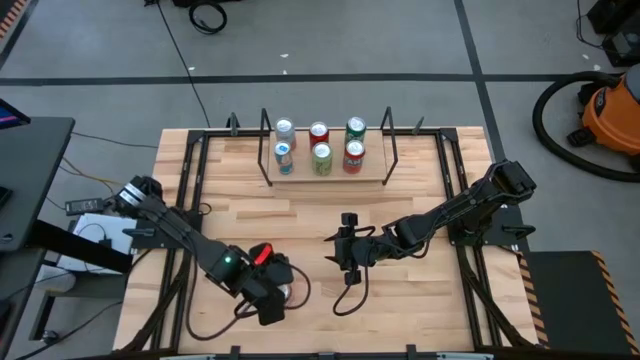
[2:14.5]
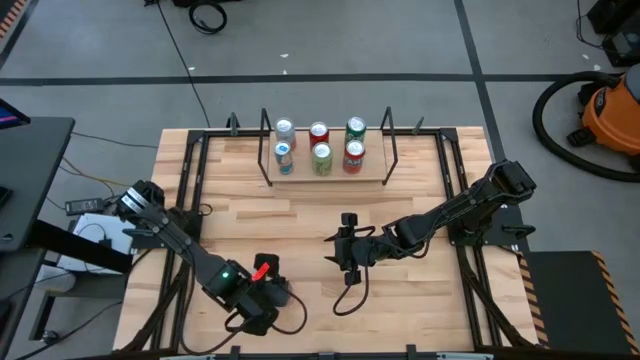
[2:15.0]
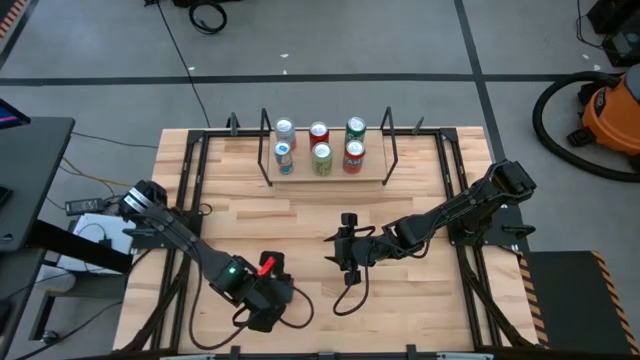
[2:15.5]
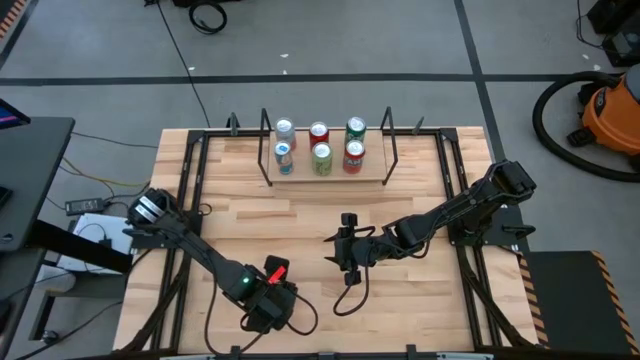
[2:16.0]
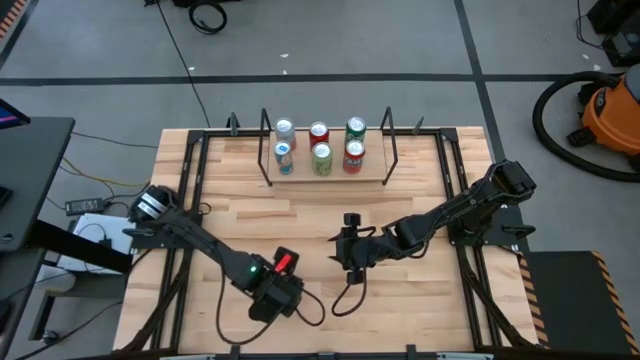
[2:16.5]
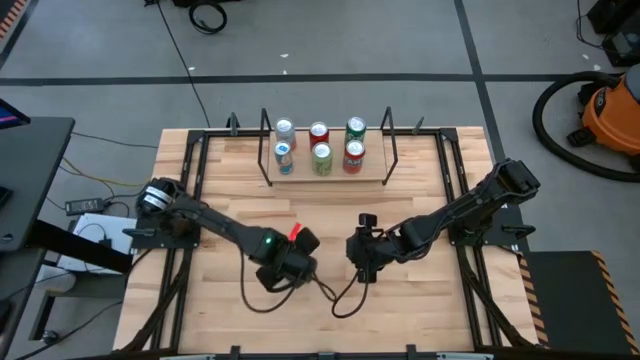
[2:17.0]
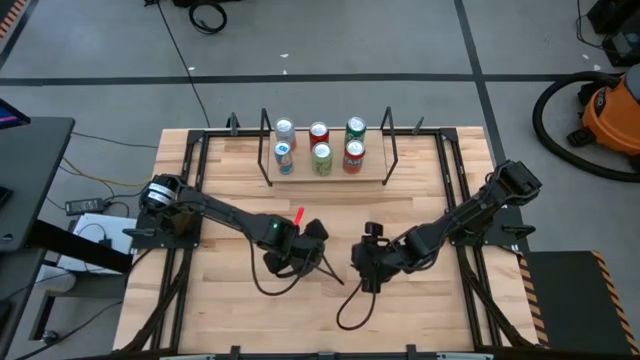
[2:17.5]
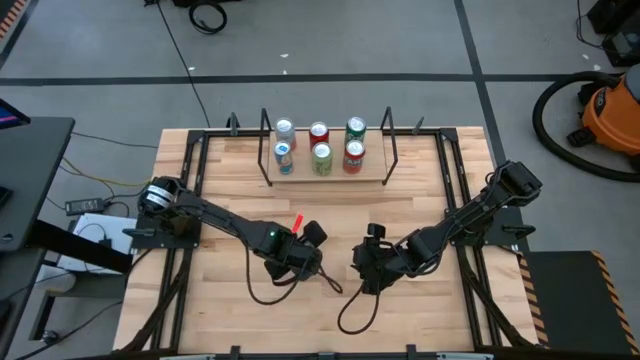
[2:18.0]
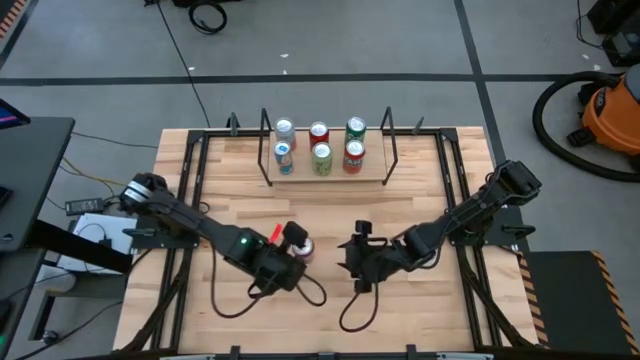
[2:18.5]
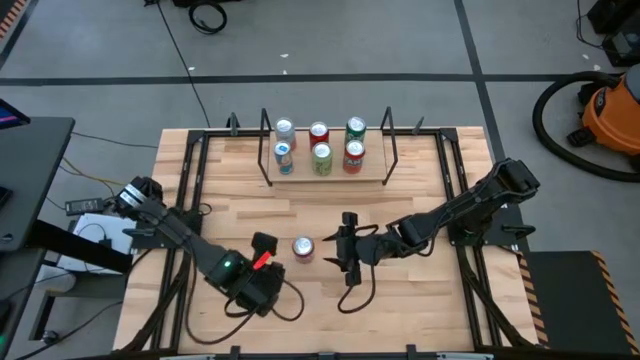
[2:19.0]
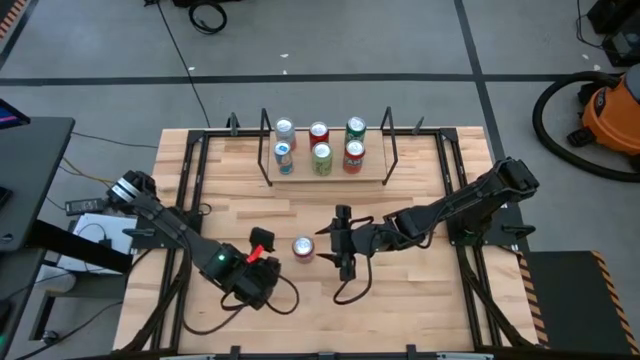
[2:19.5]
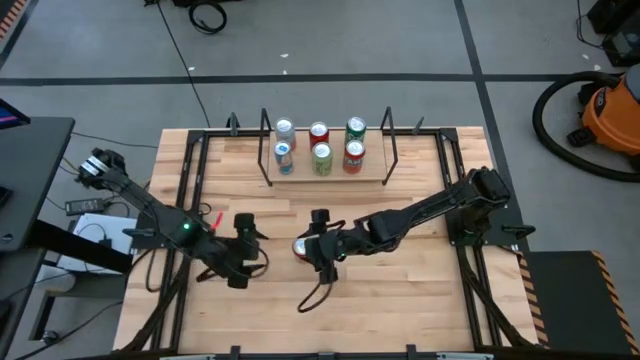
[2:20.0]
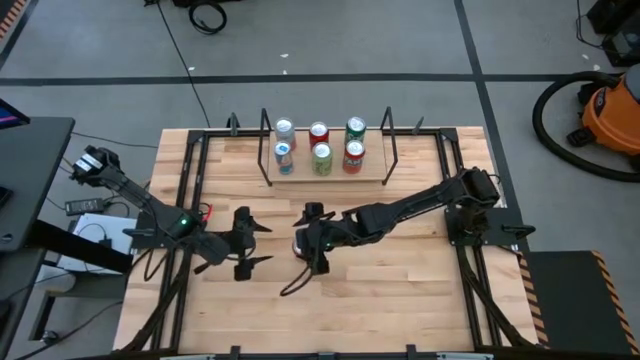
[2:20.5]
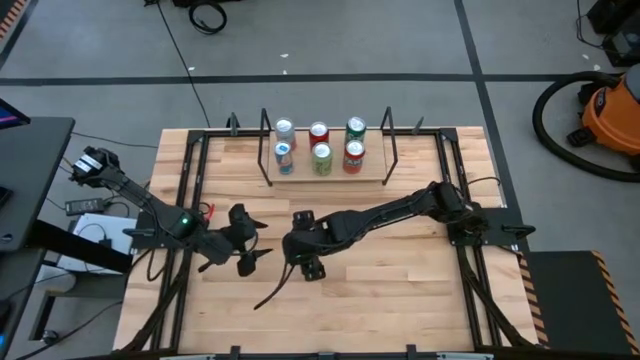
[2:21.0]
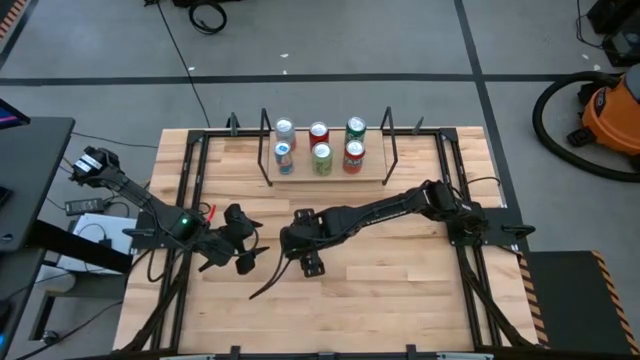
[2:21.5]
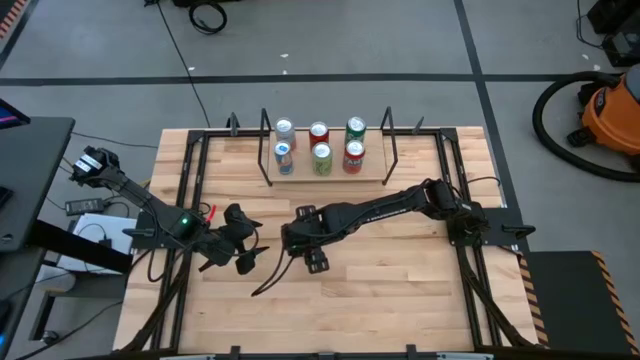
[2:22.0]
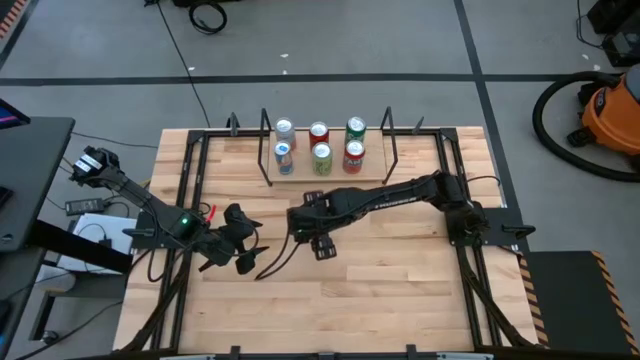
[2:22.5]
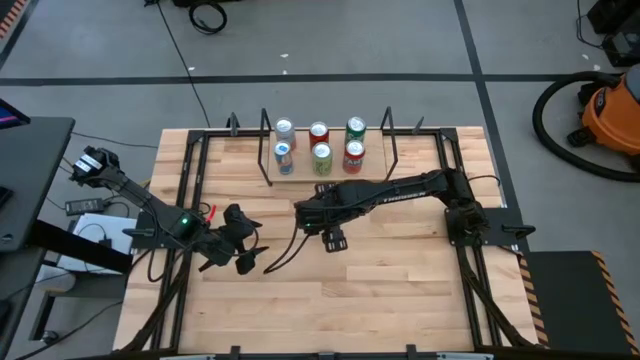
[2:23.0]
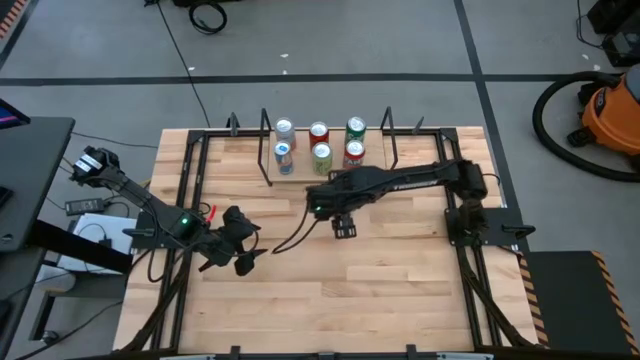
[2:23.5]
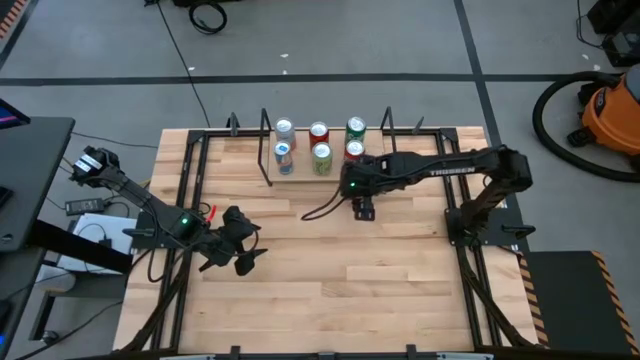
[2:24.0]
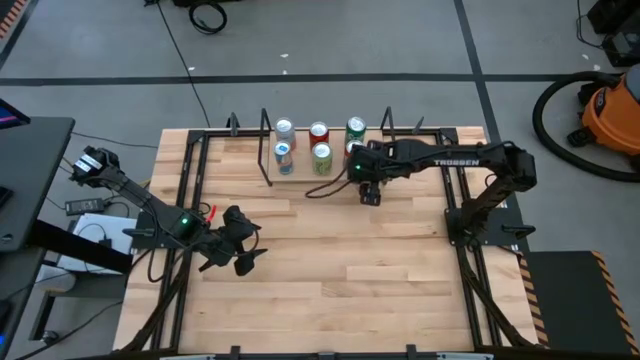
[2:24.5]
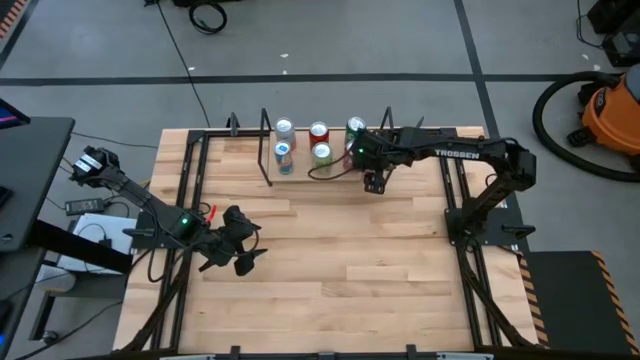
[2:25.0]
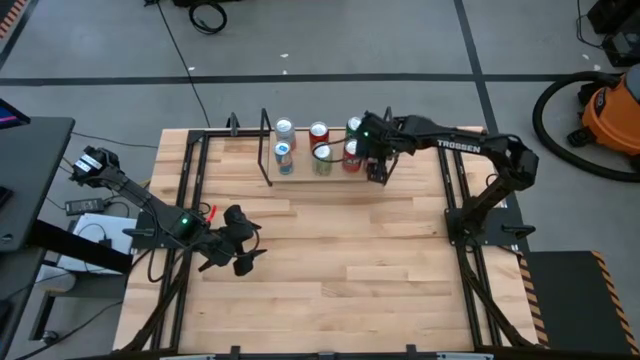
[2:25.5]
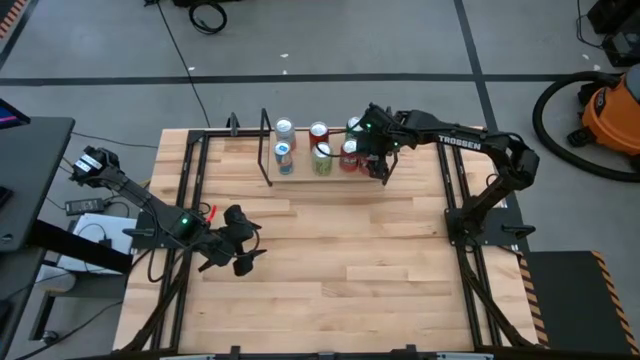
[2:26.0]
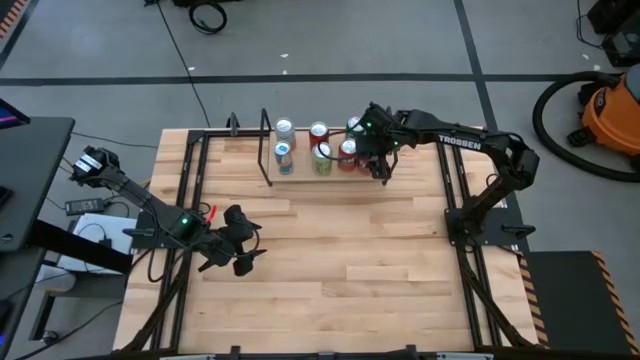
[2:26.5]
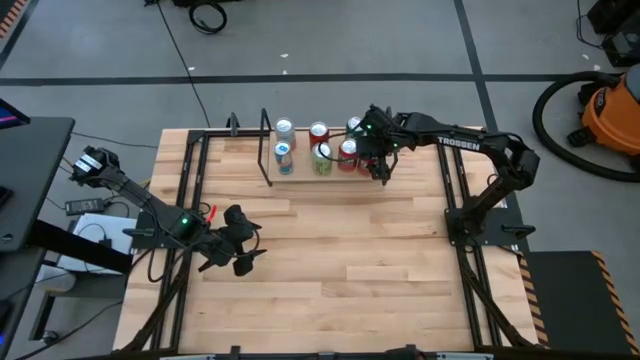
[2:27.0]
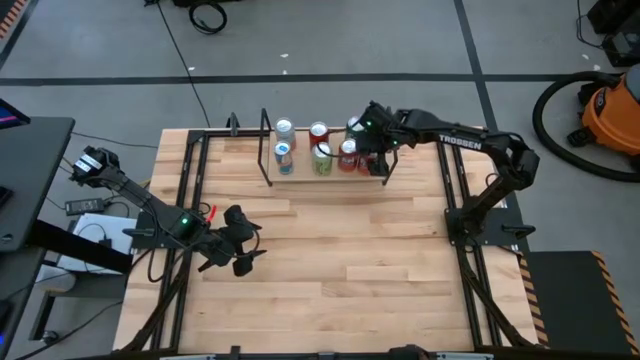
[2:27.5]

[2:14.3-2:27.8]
Task: Place canned beverage on shelf
Put the red soda can on the shelf

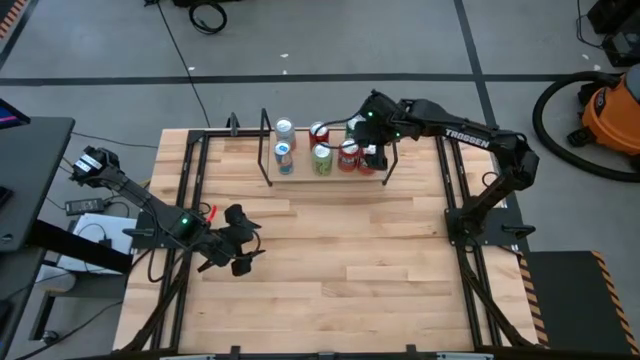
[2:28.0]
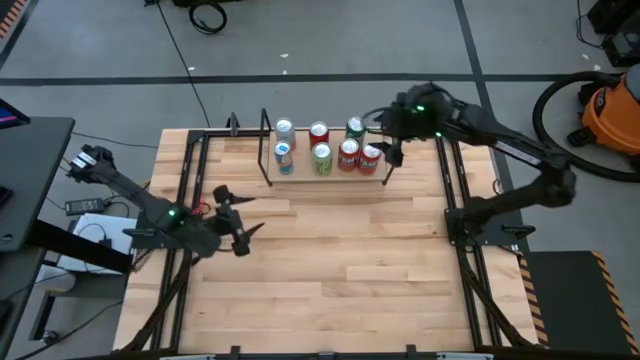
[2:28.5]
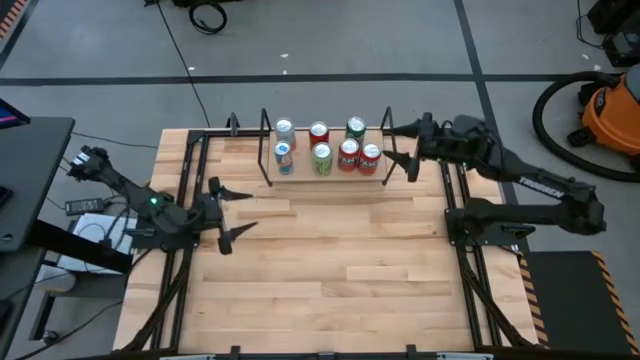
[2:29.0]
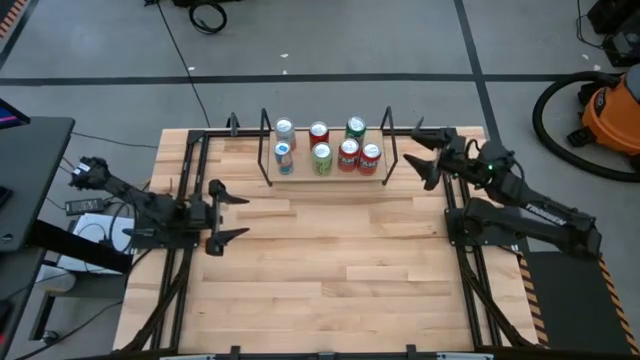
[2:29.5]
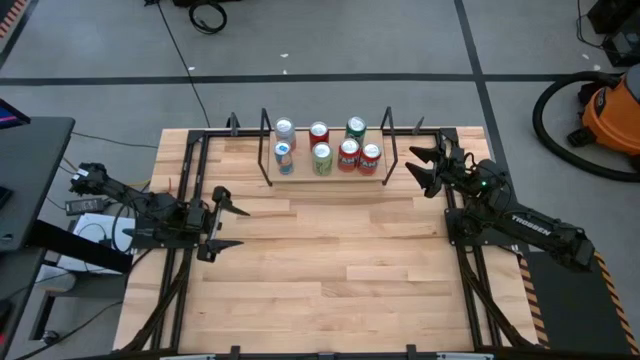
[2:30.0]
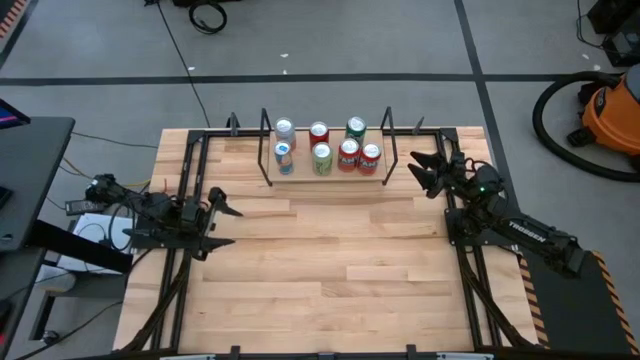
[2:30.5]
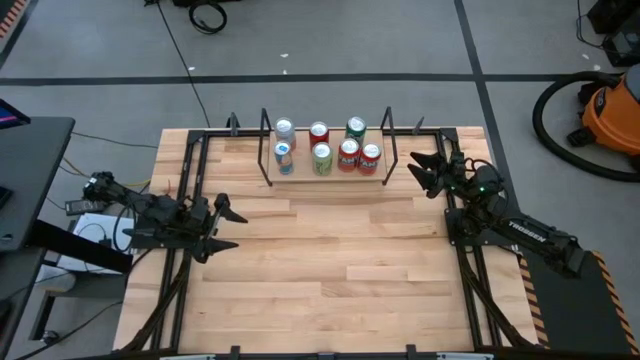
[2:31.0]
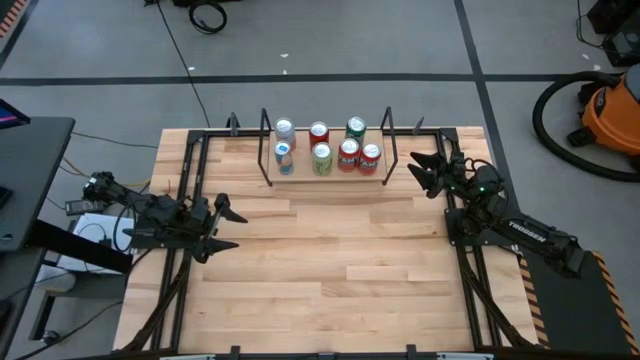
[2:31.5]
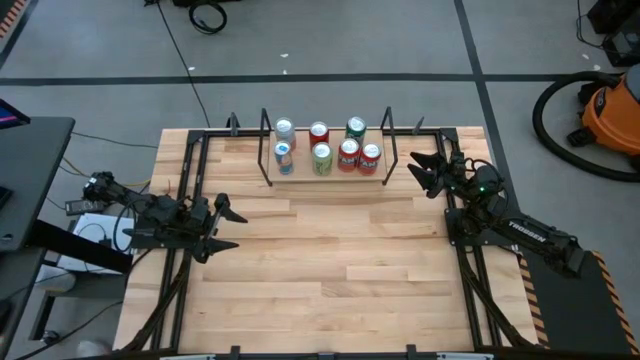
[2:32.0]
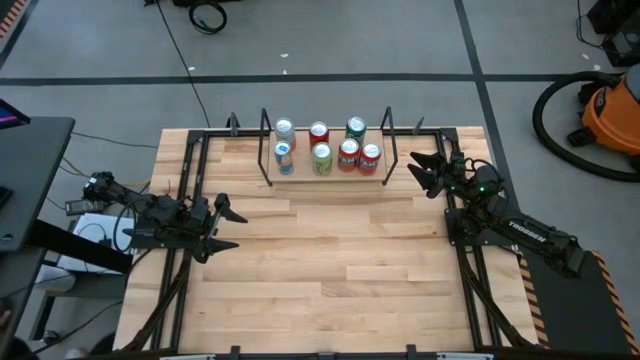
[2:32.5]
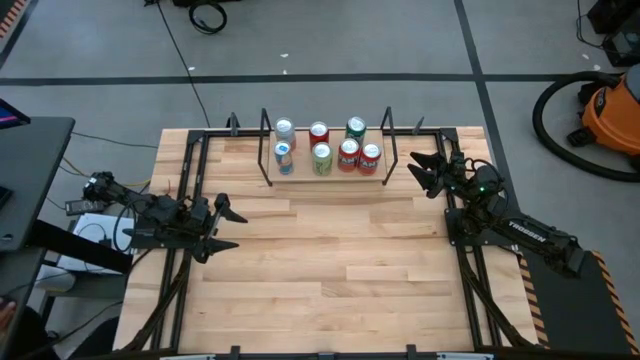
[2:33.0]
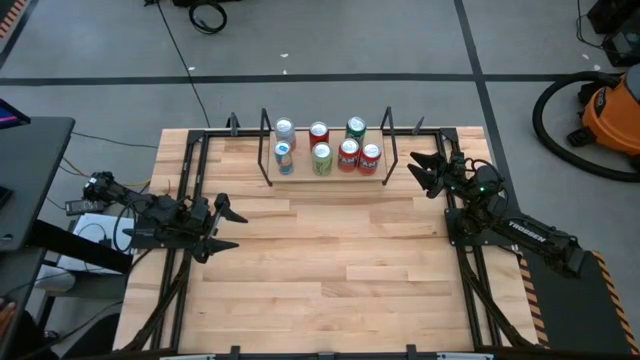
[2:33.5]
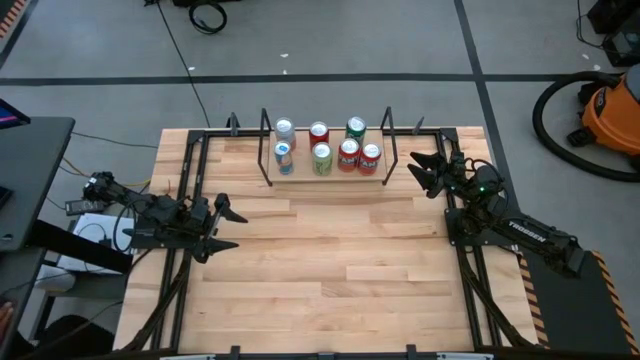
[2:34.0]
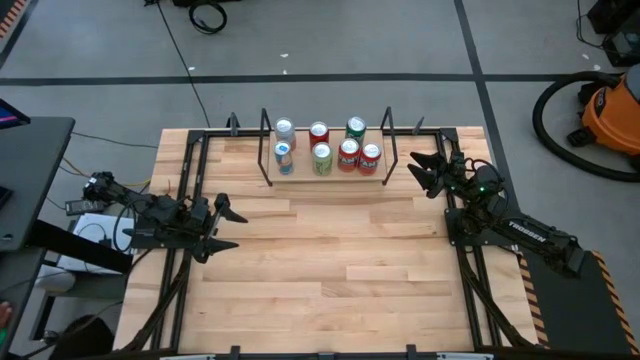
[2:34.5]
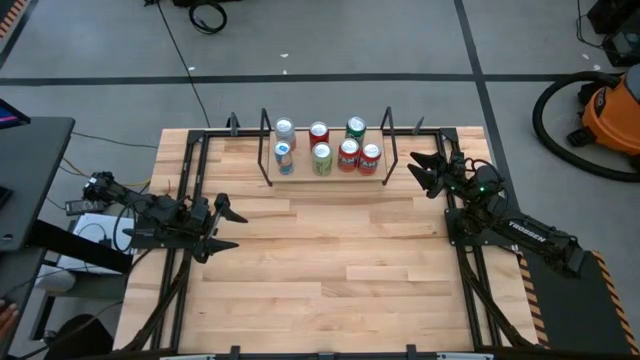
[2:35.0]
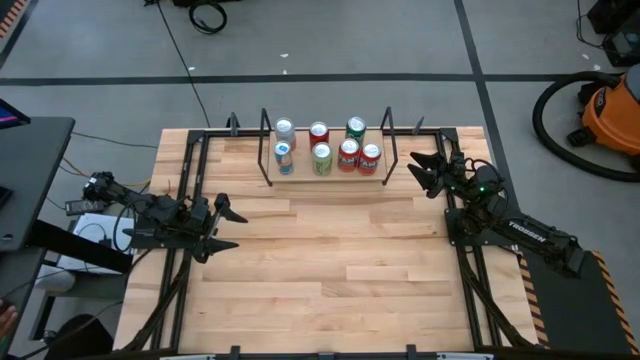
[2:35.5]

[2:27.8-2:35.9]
Return to Home Position
